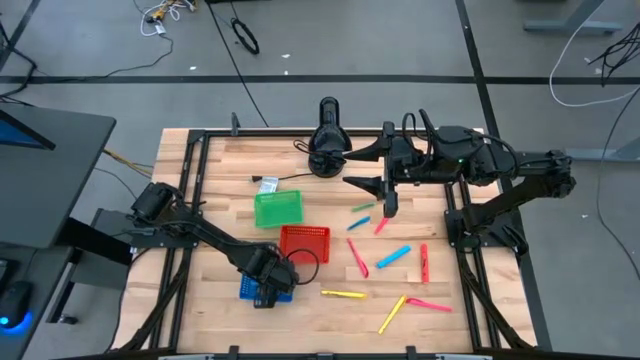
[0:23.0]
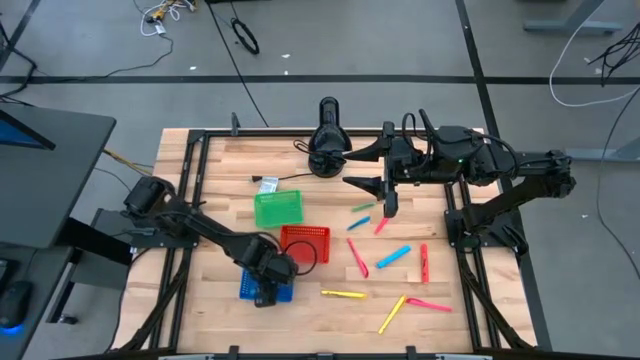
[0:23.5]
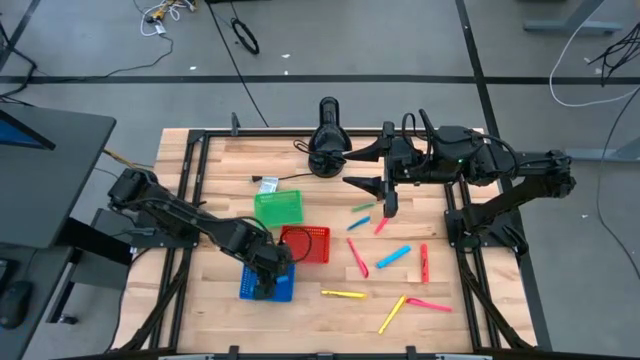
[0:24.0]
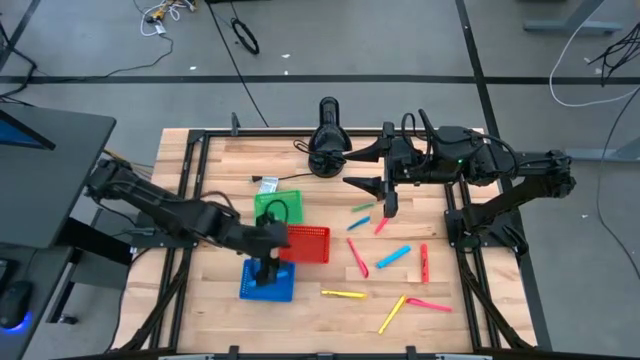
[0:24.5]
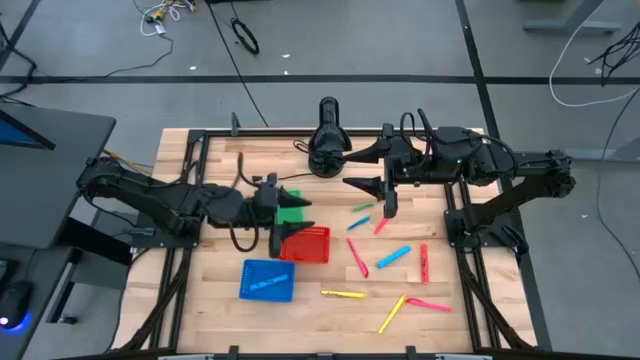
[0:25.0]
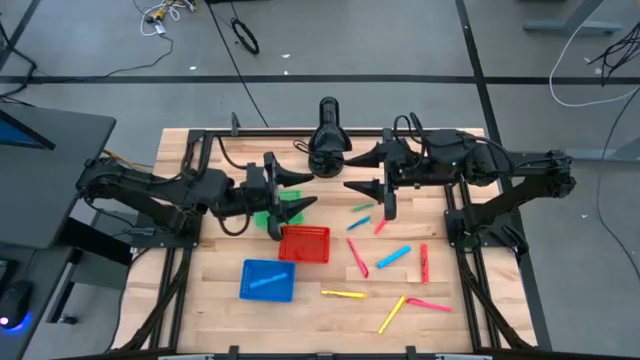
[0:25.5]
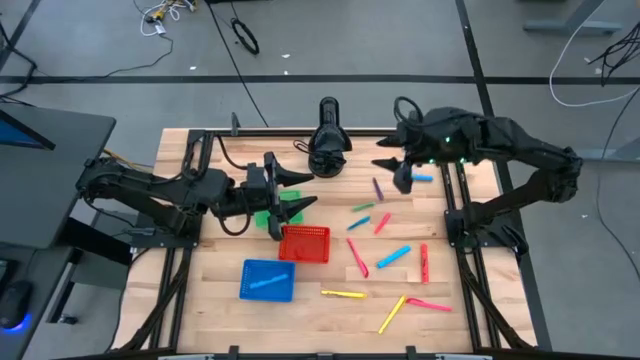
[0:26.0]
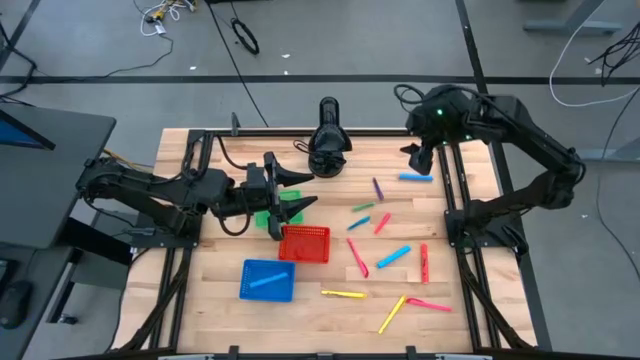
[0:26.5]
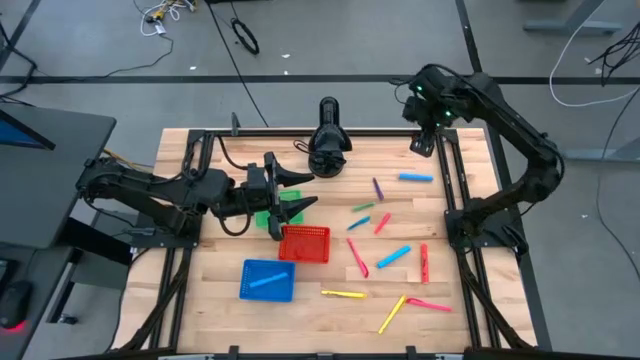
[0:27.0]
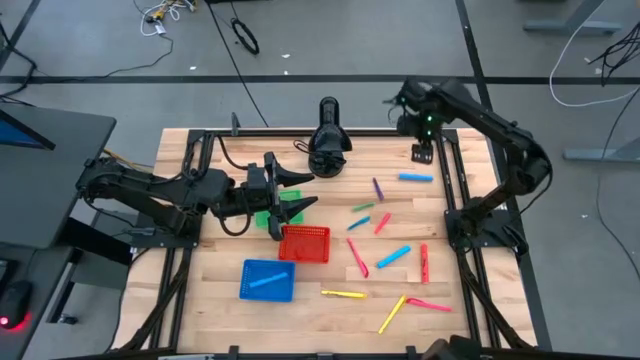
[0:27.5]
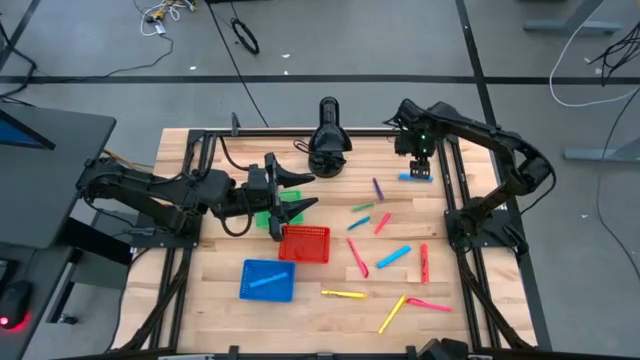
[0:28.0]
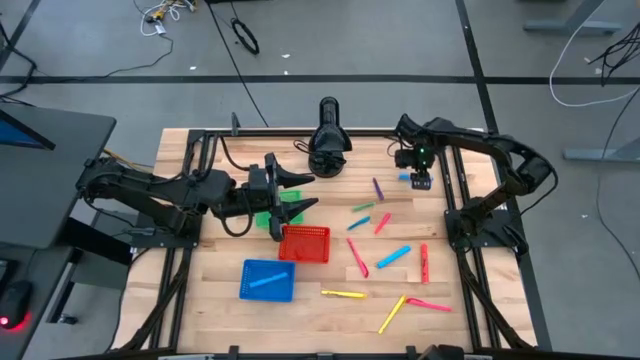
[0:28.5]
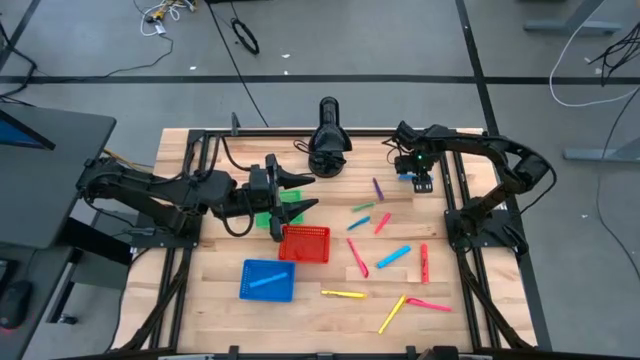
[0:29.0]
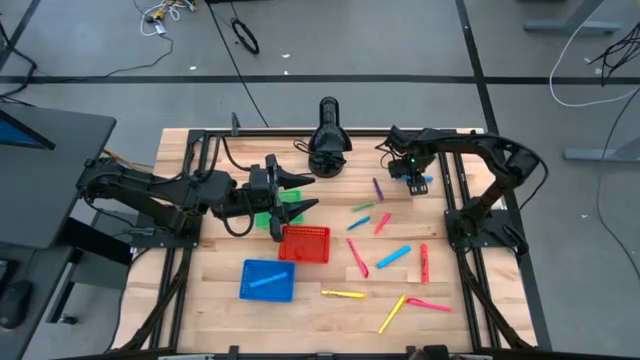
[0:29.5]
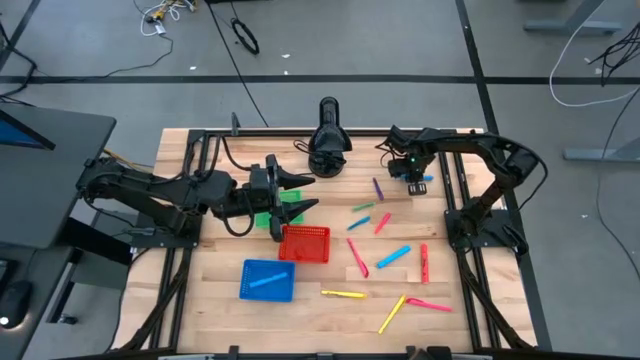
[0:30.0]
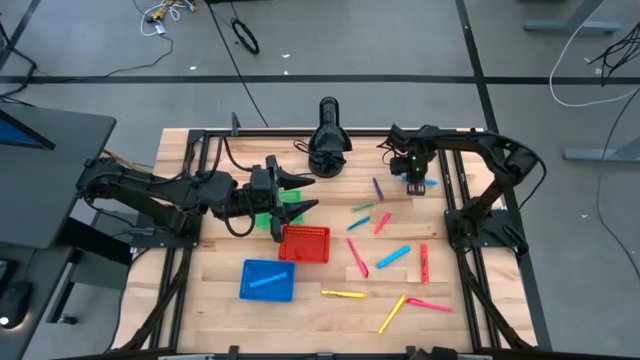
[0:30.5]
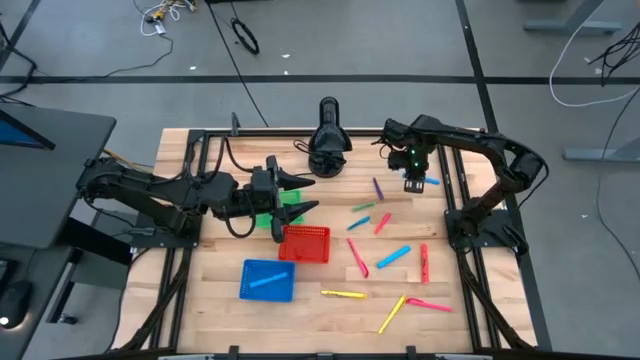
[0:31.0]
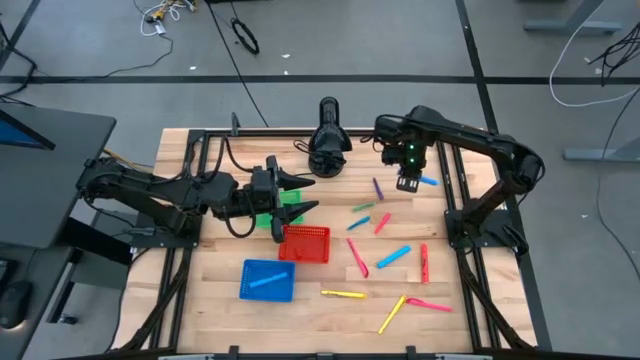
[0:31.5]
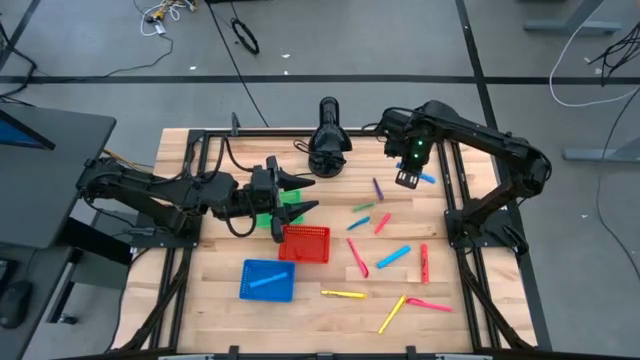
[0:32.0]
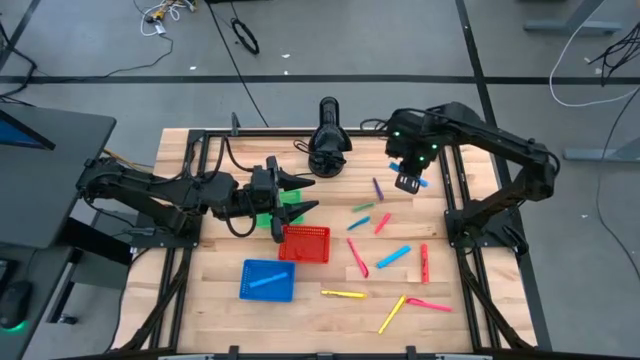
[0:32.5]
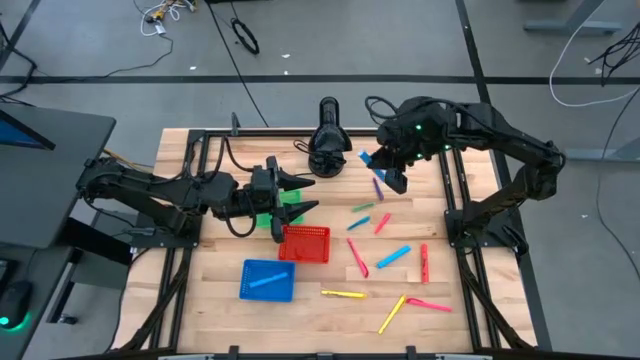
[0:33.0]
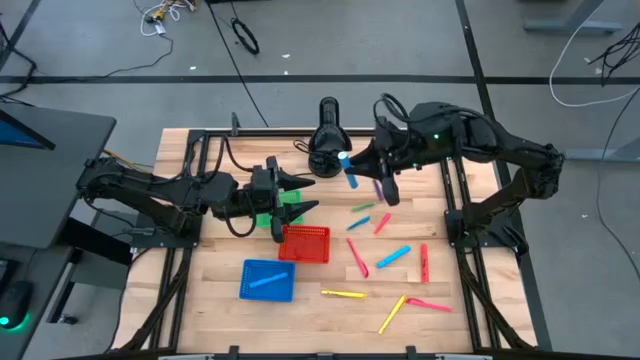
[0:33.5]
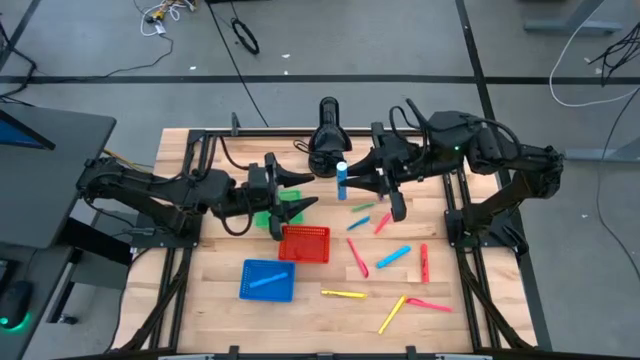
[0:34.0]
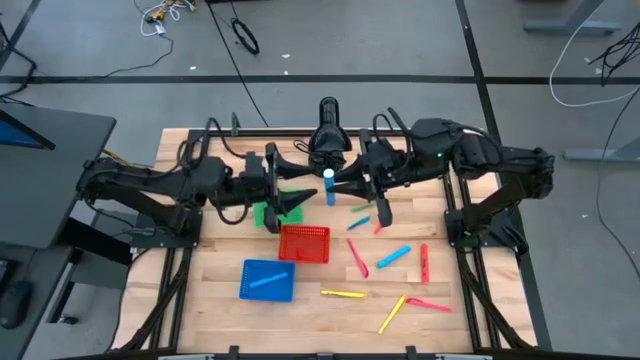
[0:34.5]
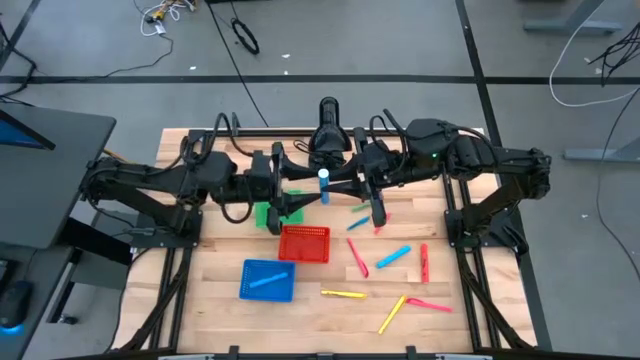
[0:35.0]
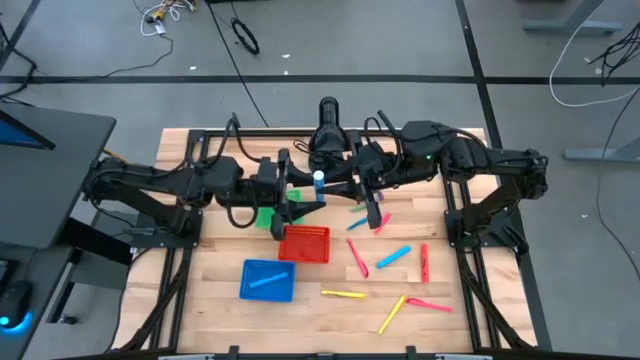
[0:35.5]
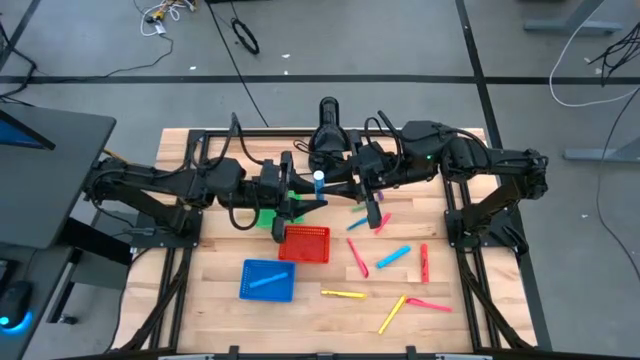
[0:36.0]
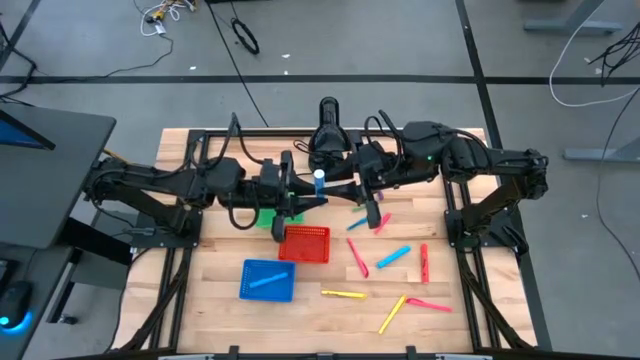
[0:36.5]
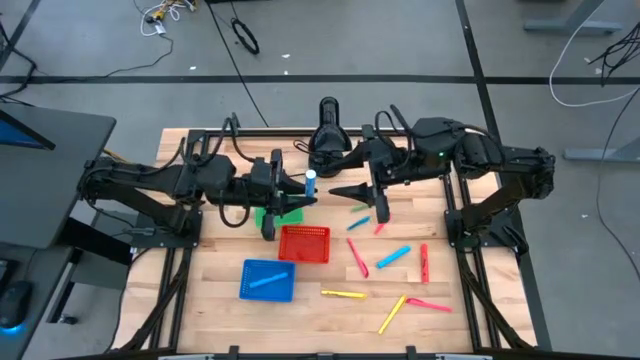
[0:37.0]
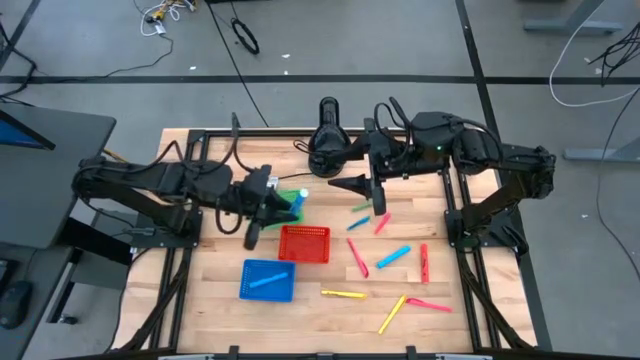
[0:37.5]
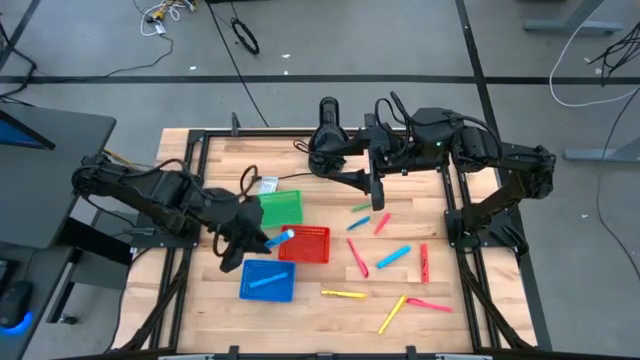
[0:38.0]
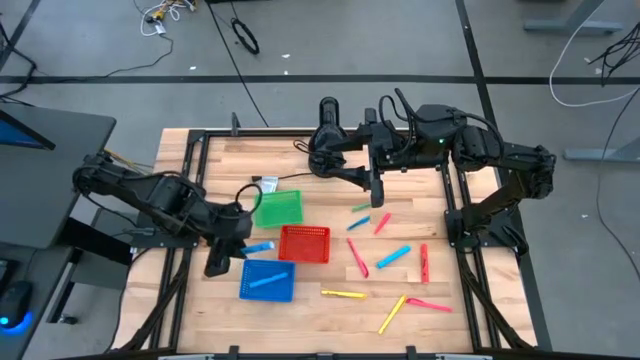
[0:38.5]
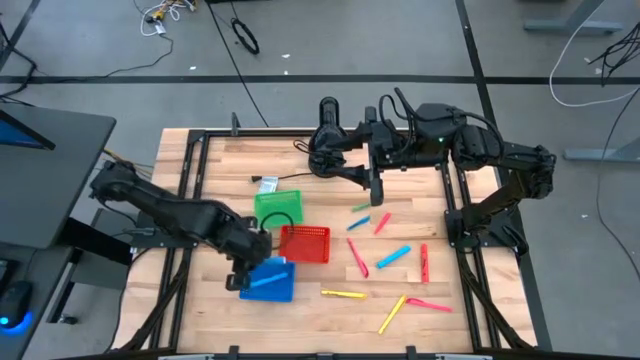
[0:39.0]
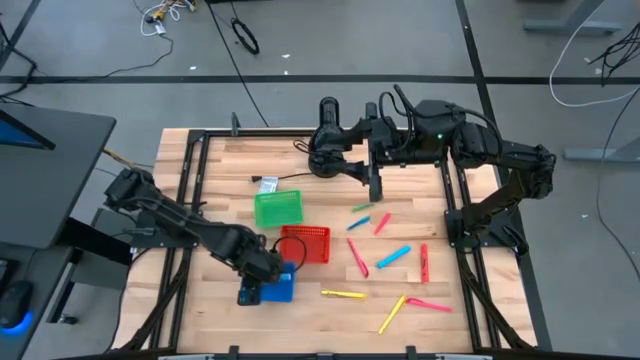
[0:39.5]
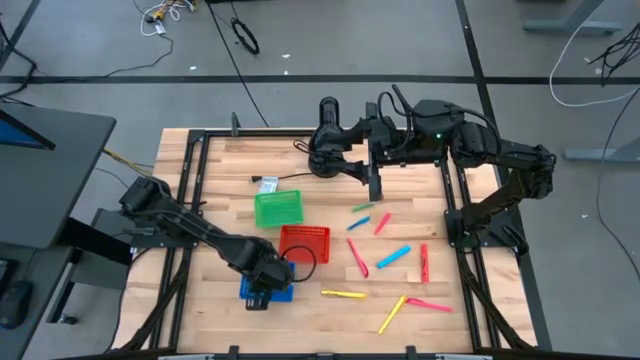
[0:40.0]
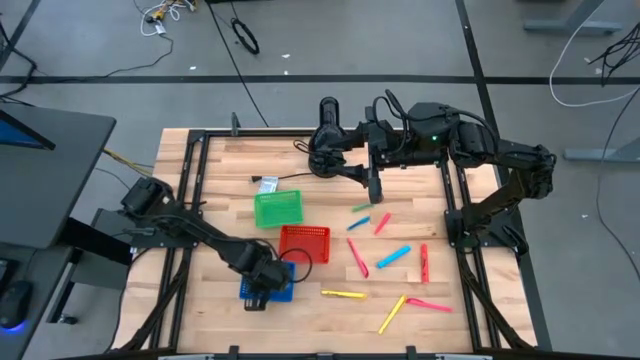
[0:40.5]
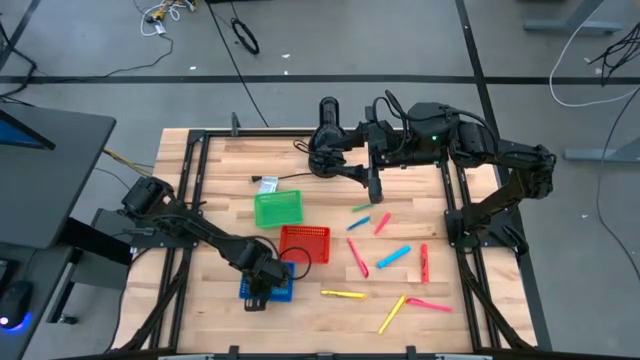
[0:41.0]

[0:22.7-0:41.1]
Task: Pick & Place Markers
Put the top blue highlighter pen into the blue bin

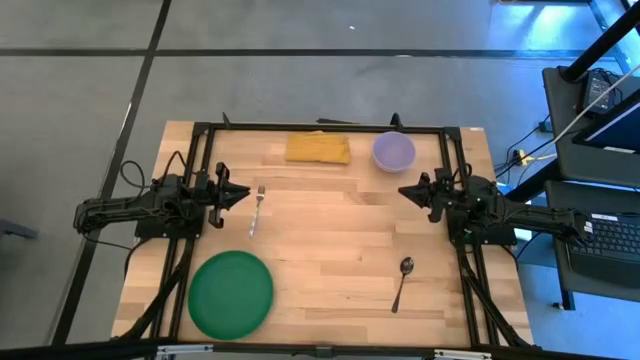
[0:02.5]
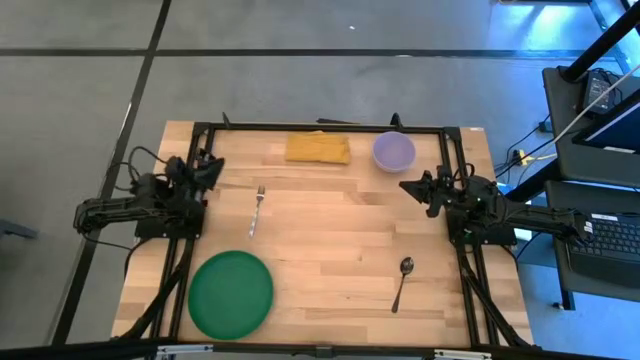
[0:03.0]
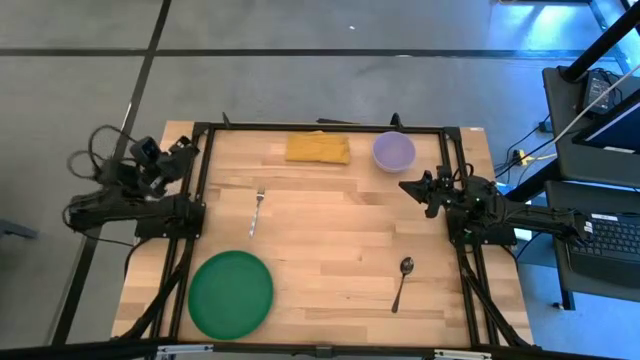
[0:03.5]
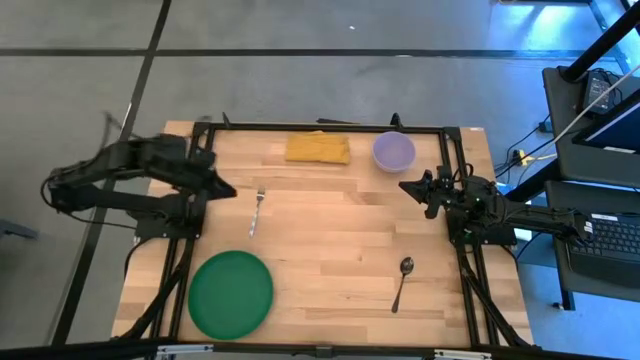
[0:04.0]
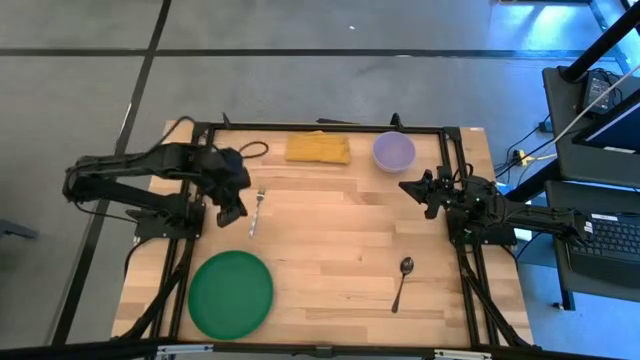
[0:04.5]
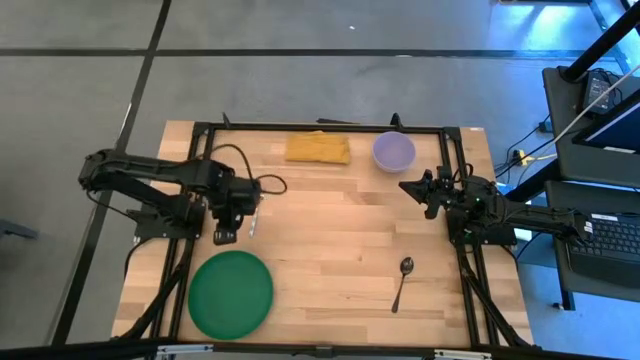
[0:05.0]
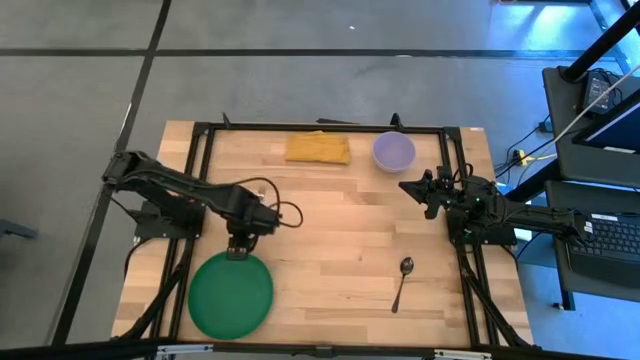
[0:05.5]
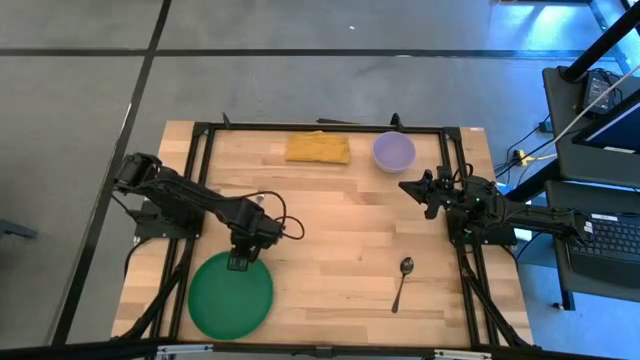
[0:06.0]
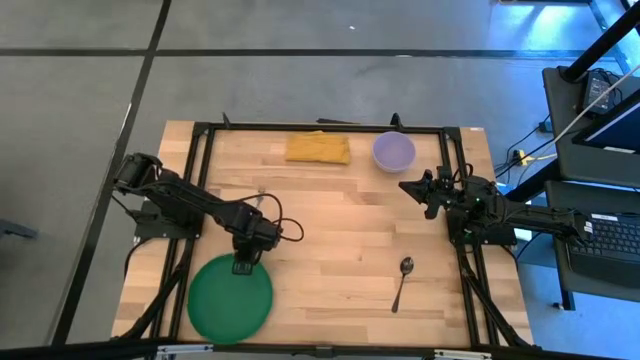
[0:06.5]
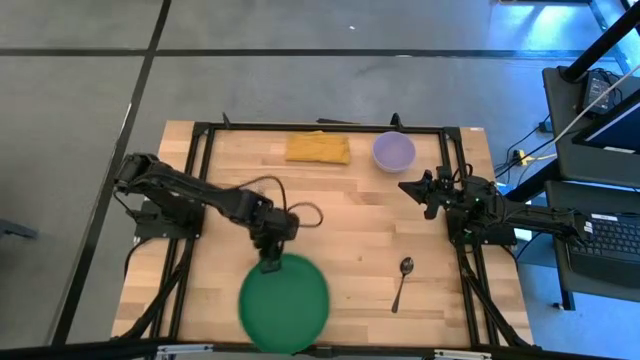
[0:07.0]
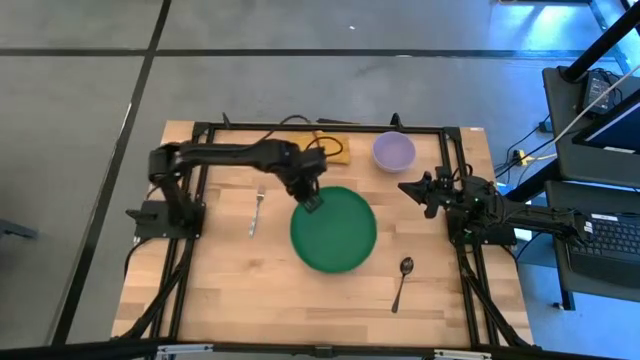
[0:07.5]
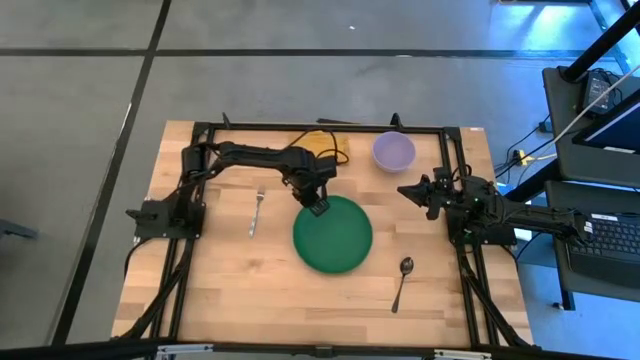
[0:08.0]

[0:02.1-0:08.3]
Task: Set table place
Move the green plate to the center of the table
